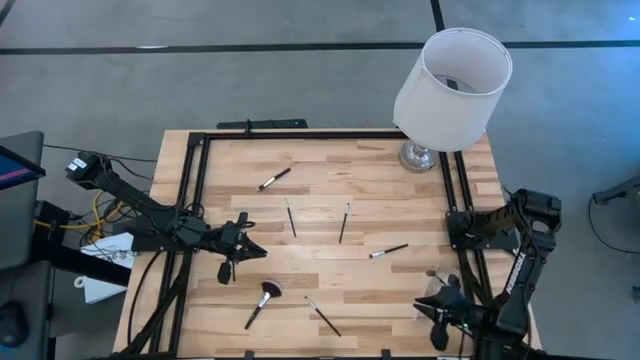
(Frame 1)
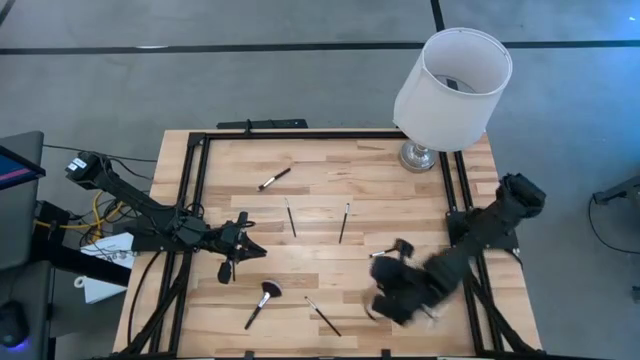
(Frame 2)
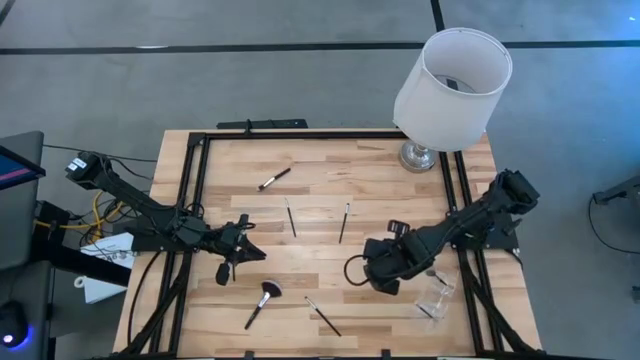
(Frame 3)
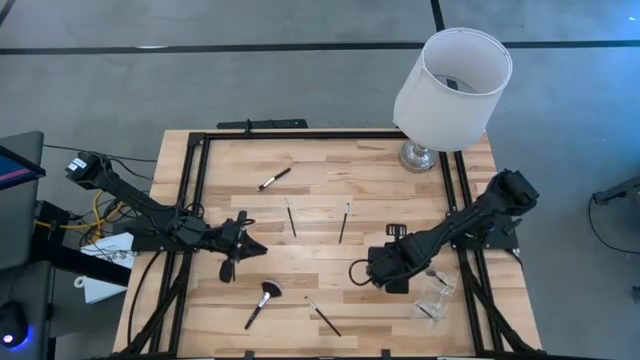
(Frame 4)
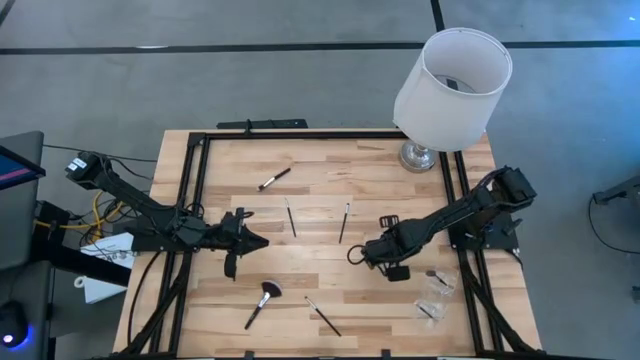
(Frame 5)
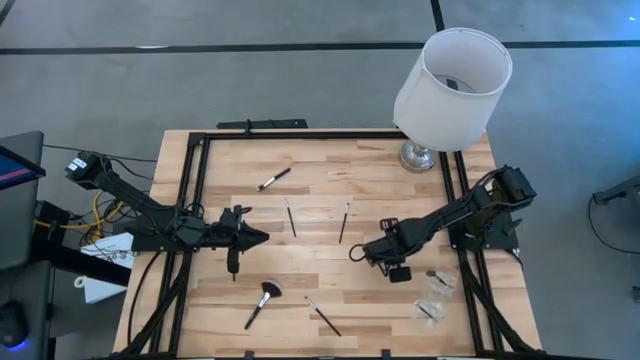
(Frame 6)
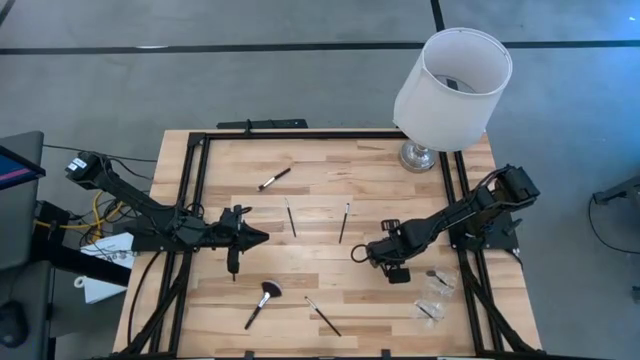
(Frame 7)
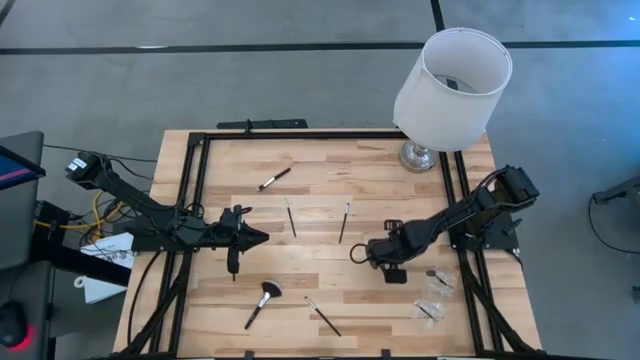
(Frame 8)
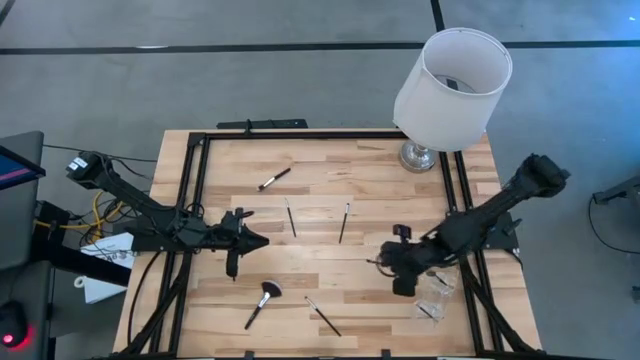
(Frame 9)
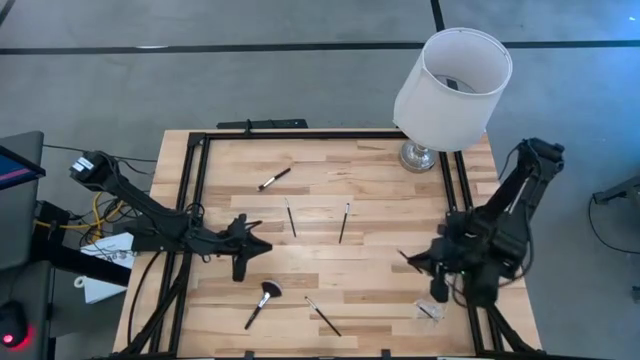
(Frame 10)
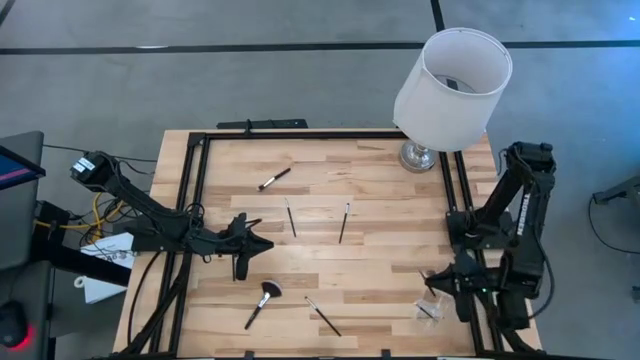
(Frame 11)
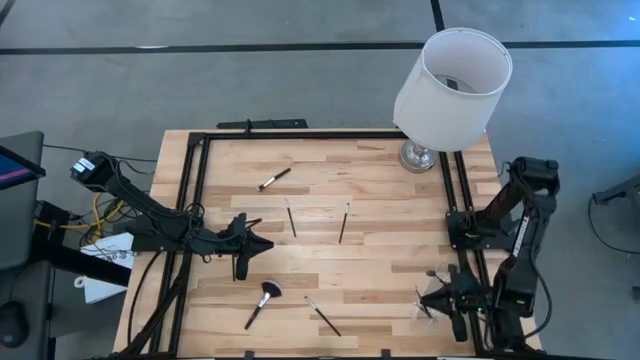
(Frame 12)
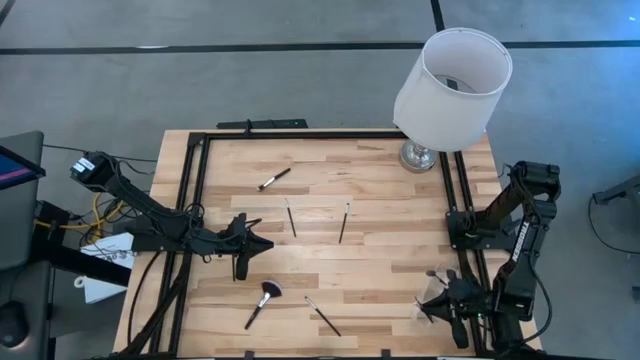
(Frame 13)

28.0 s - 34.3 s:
Task: Pick & Place Makeup Brushes
Put the black eyeshadow brush into the transparent organizer

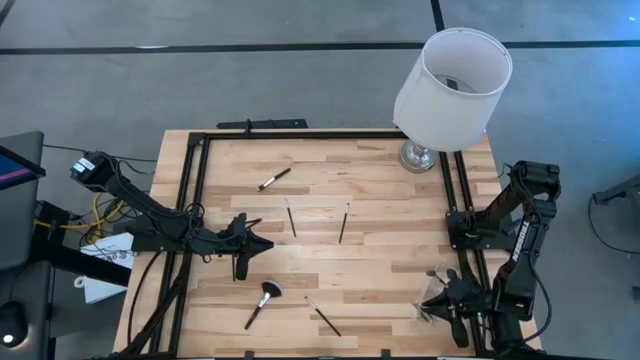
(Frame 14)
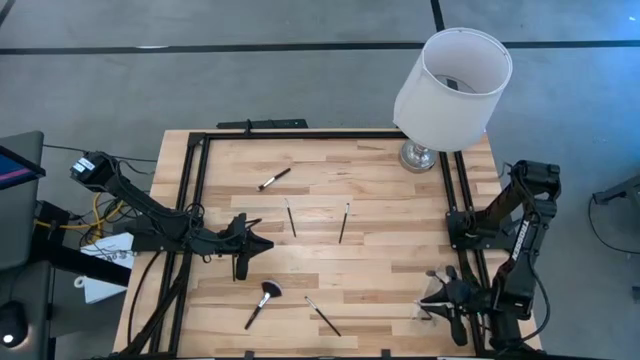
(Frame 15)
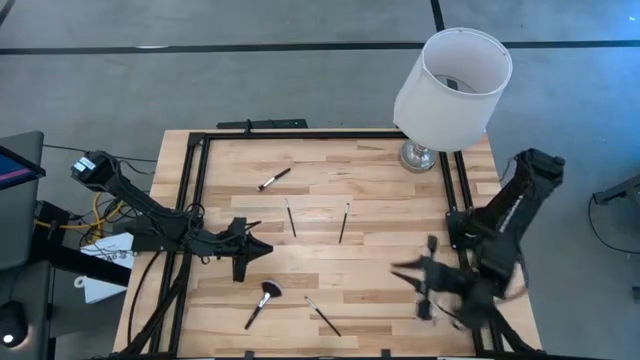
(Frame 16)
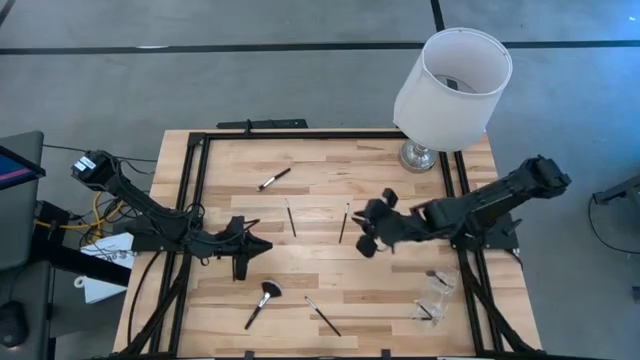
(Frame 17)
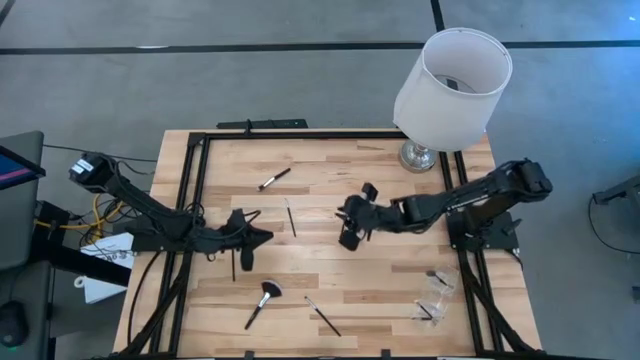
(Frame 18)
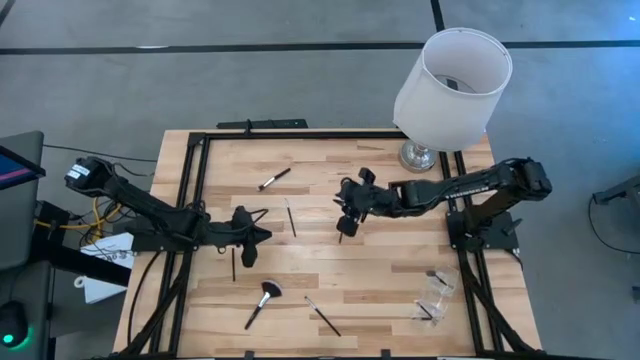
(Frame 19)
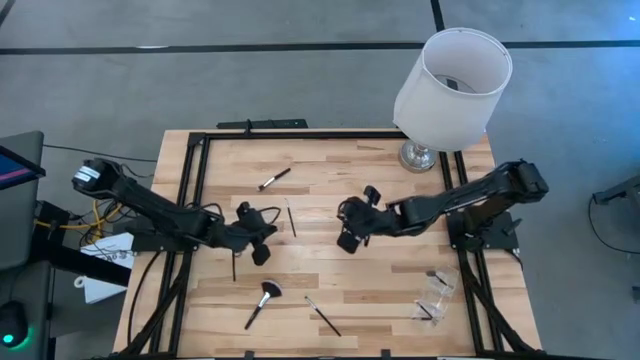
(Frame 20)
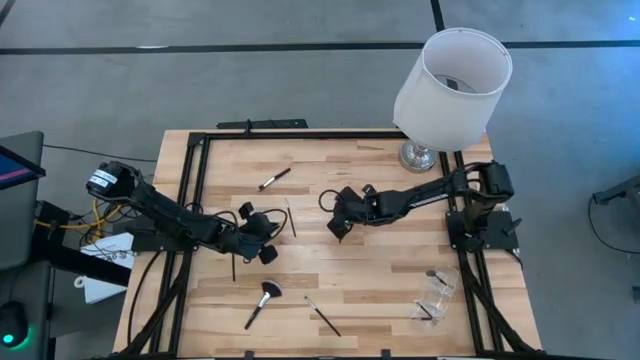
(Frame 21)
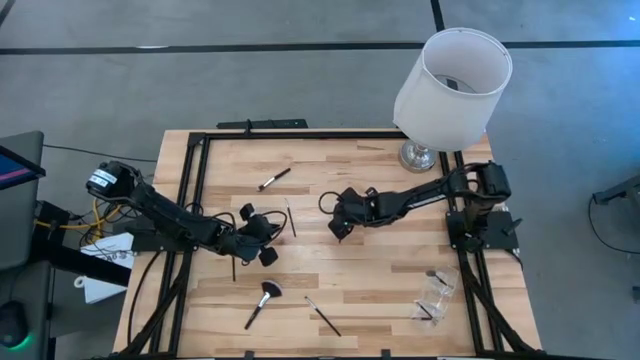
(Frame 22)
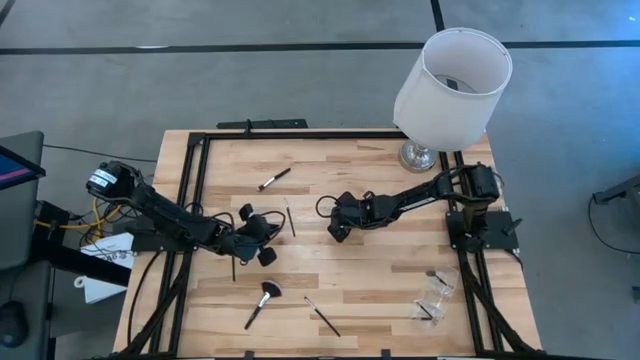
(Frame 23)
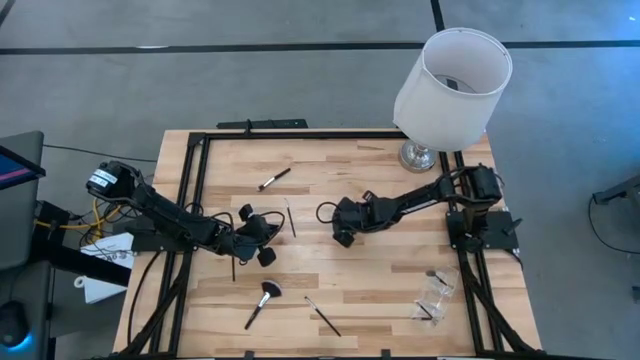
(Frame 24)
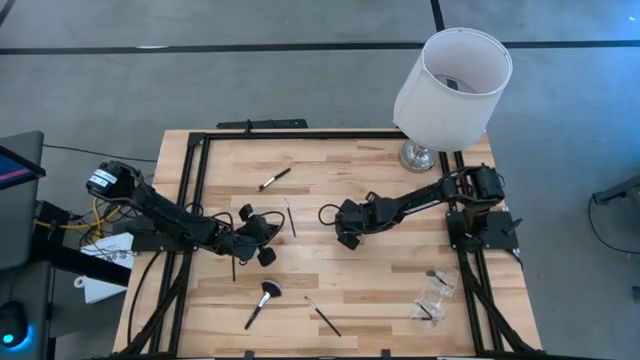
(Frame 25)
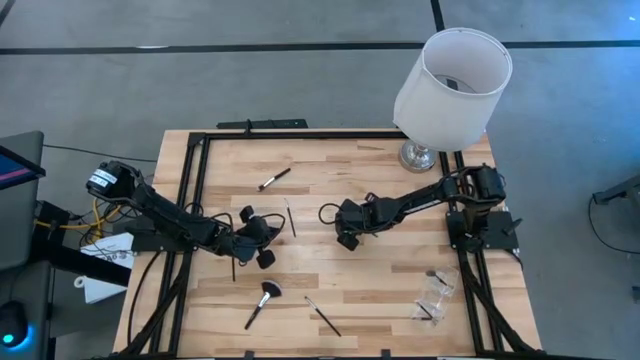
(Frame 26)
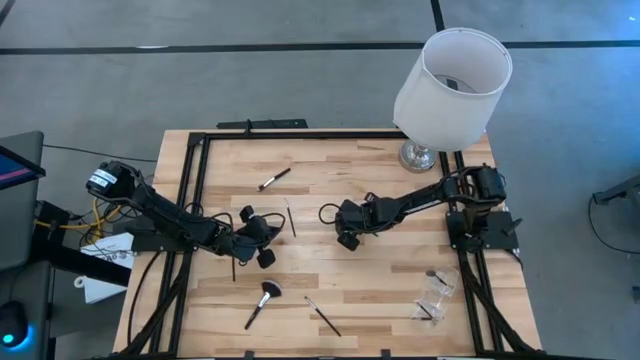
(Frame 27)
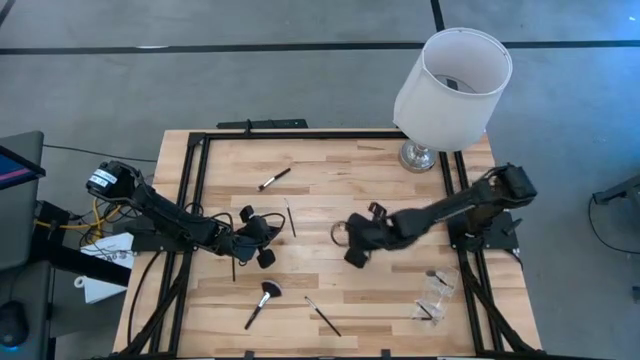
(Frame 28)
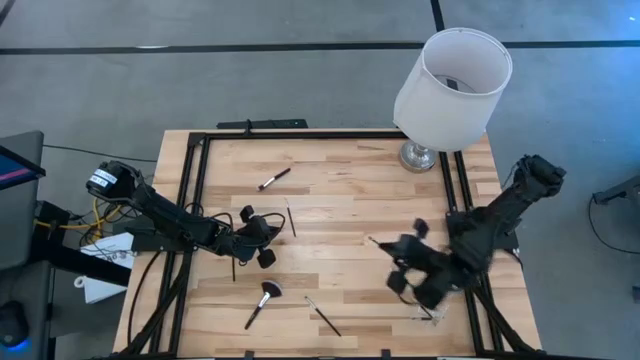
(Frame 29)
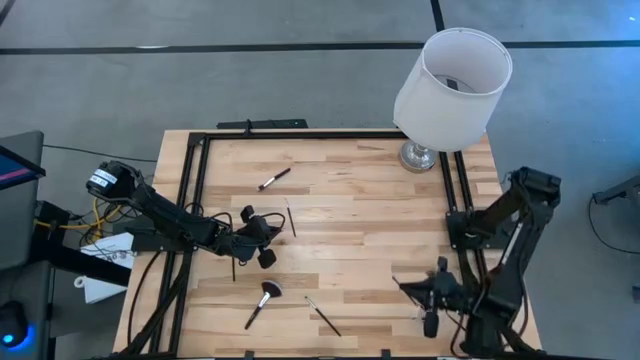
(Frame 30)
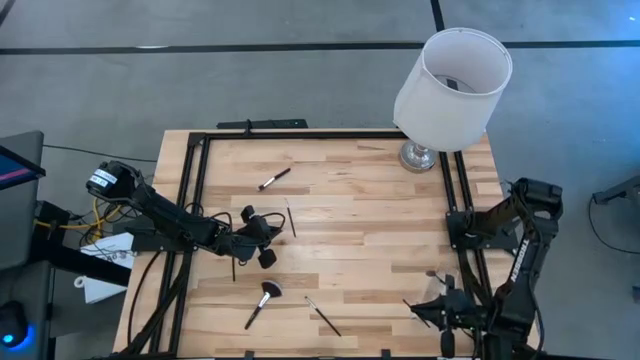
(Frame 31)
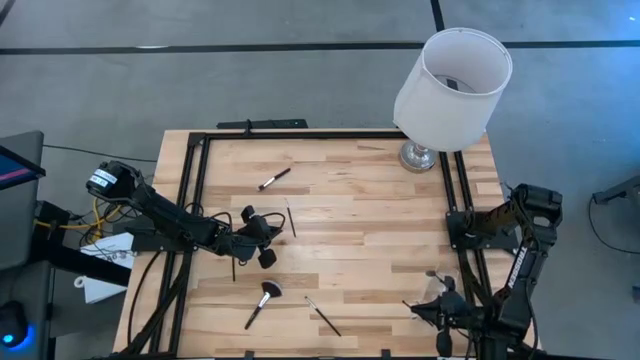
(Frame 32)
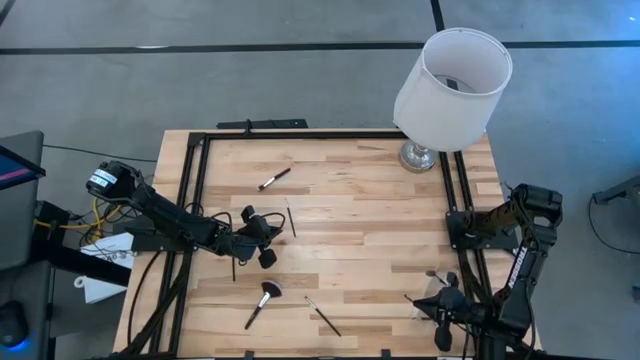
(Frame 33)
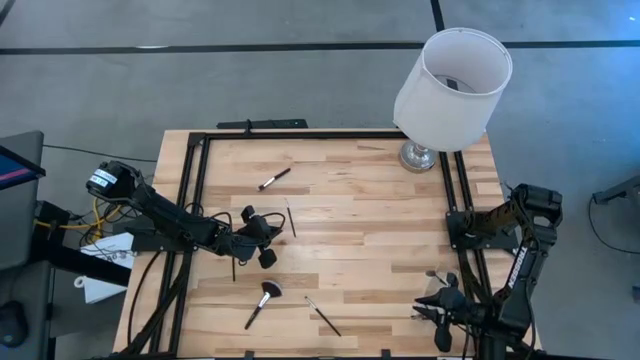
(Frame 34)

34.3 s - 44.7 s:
Put the black eyeshadow brush into the transparent organizer

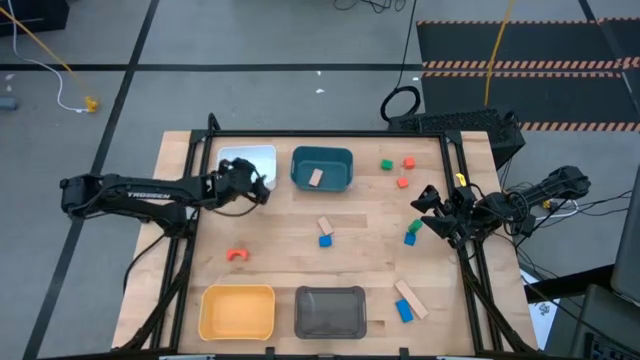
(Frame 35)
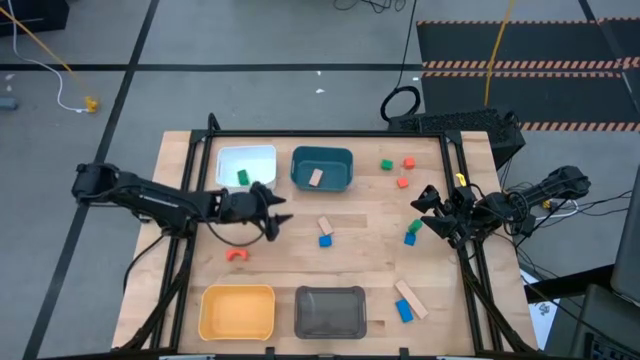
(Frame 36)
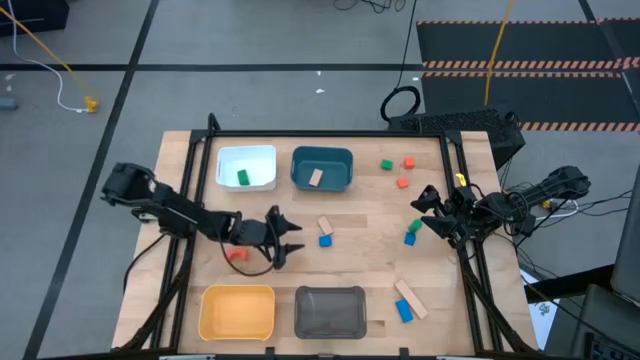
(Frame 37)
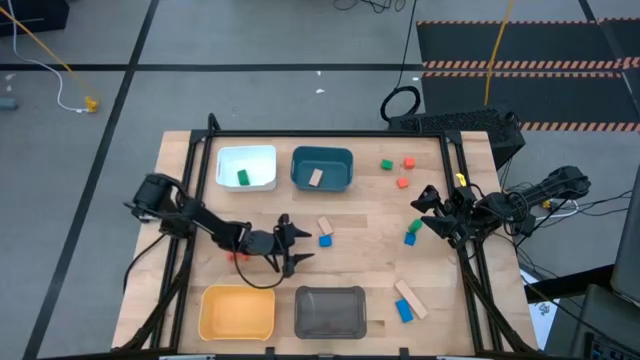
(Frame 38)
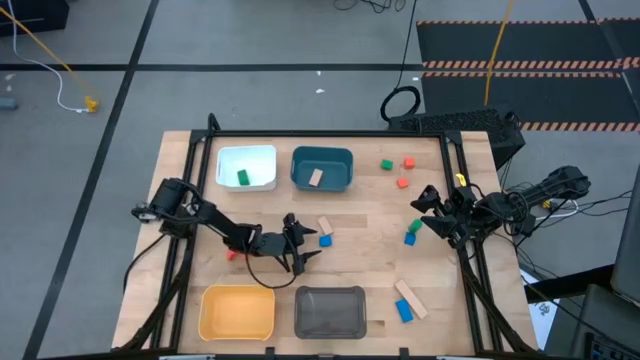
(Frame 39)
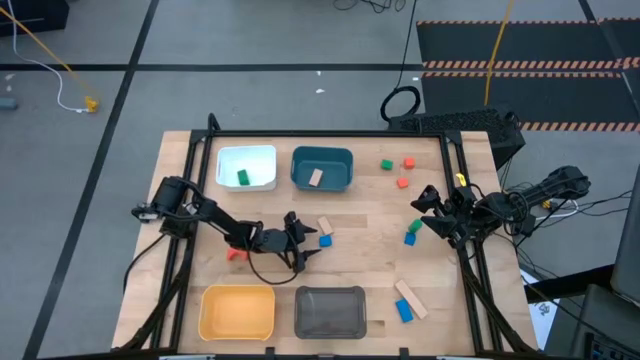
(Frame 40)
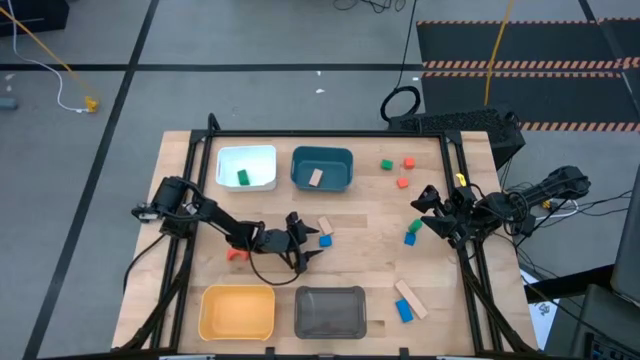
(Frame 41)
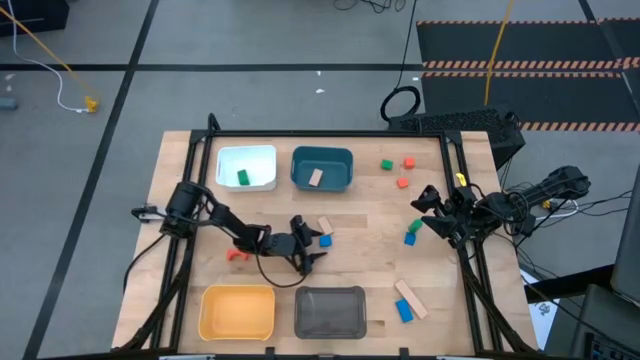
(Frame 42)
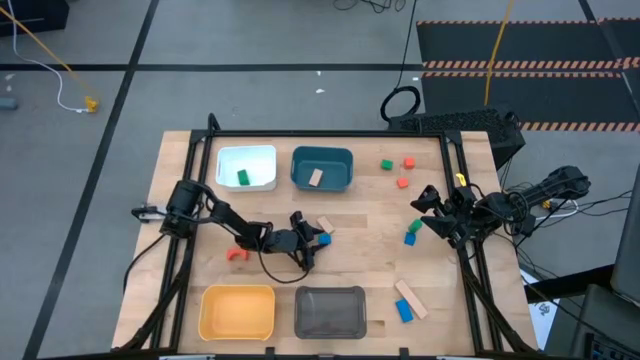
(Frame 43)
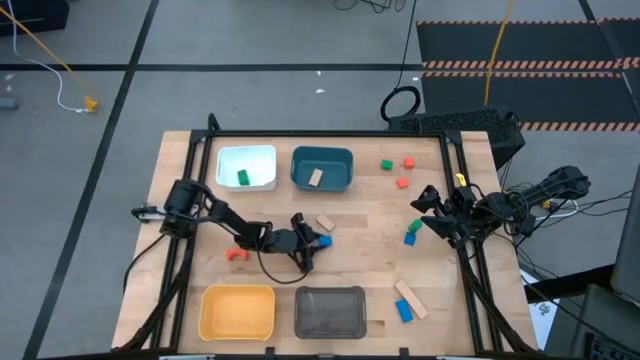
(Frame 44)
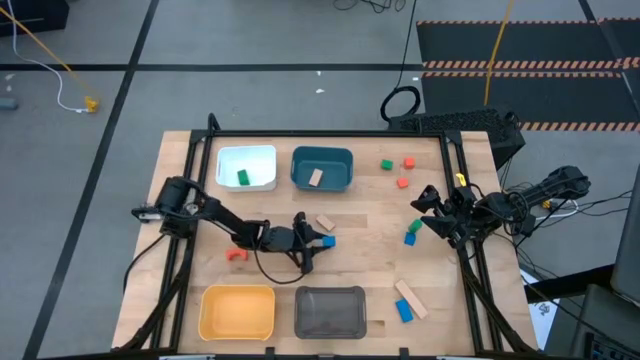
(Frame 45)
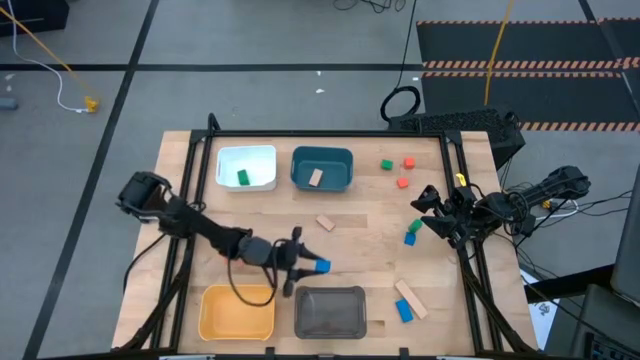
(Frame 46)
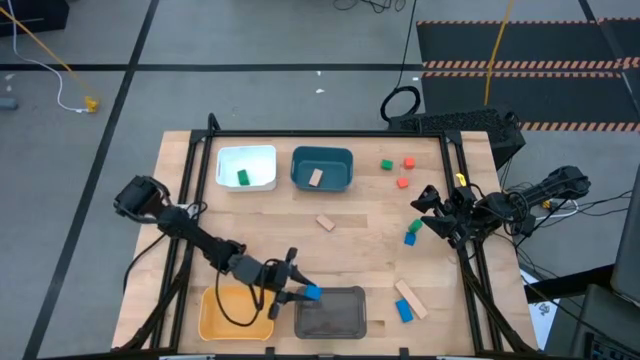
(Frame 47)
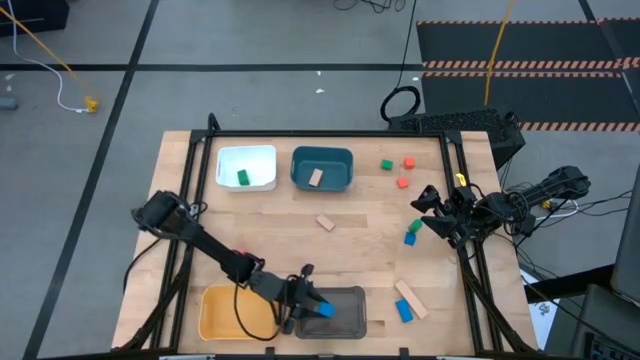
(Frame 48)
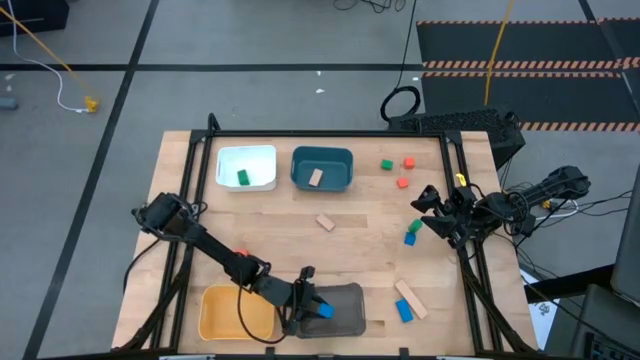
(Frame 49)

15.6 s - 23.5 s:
Task: Sort & place blocks by color
Put the top left blue block into the black bin
